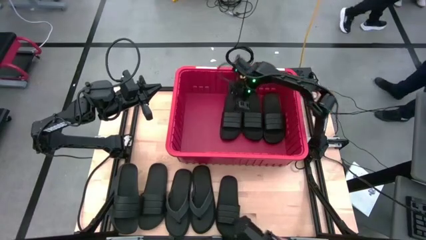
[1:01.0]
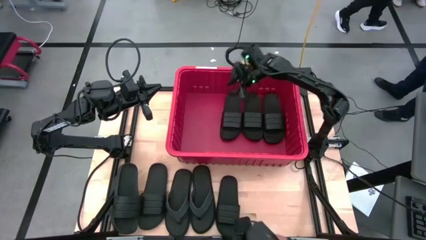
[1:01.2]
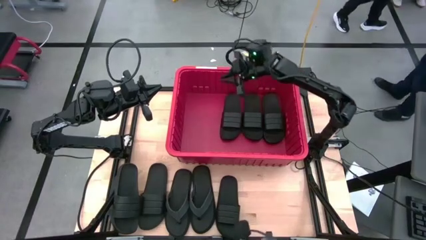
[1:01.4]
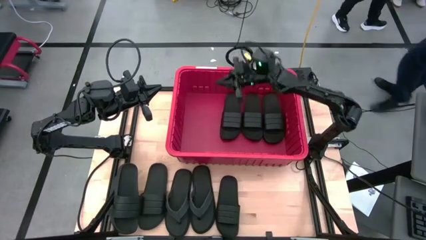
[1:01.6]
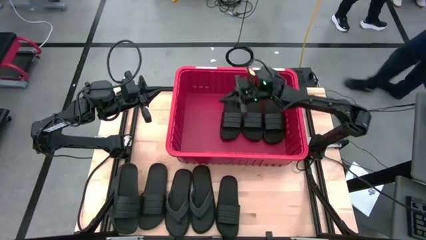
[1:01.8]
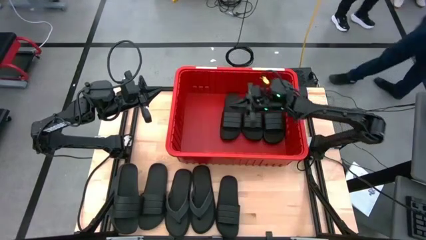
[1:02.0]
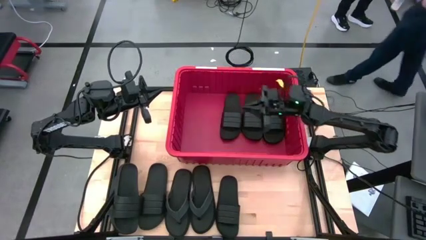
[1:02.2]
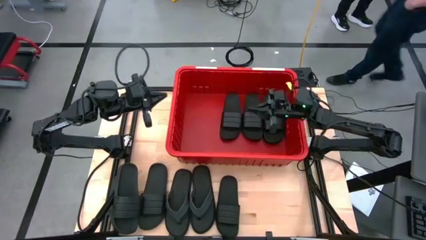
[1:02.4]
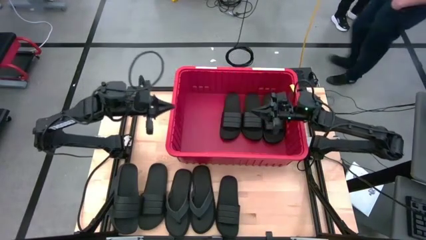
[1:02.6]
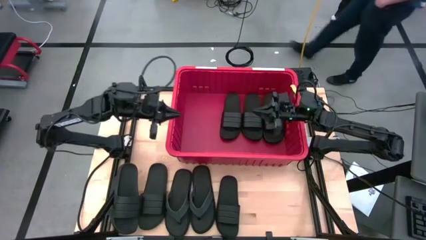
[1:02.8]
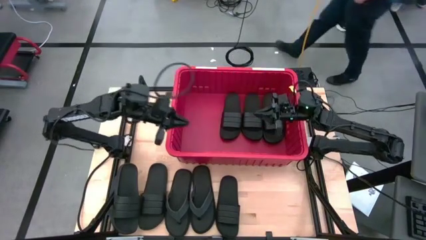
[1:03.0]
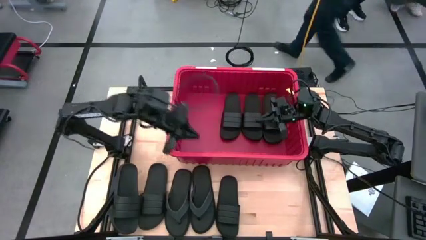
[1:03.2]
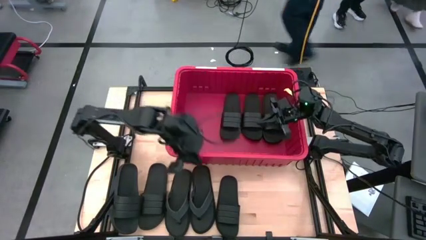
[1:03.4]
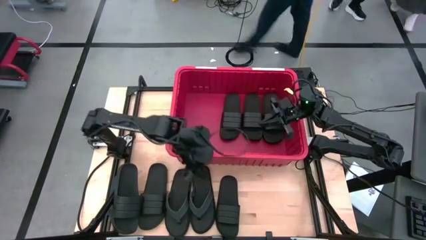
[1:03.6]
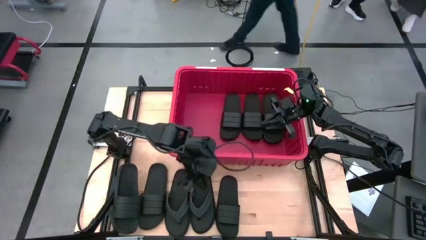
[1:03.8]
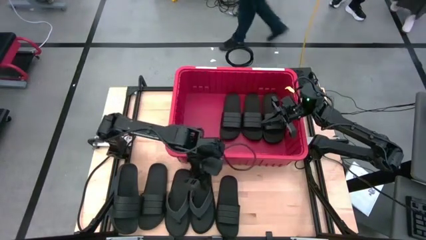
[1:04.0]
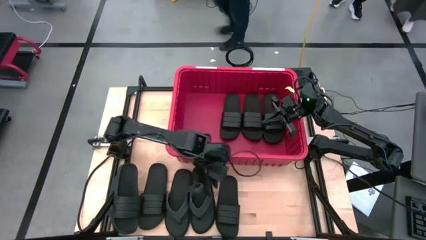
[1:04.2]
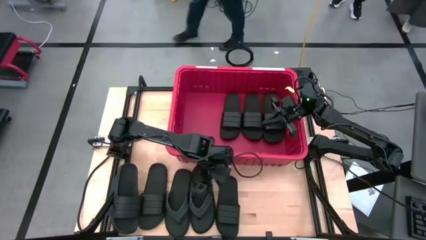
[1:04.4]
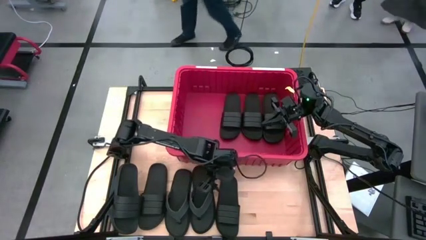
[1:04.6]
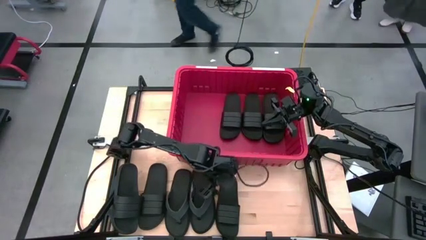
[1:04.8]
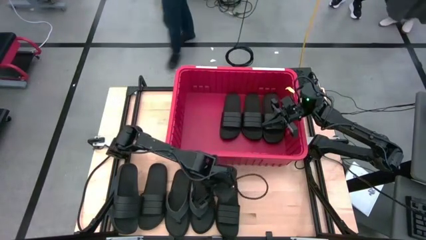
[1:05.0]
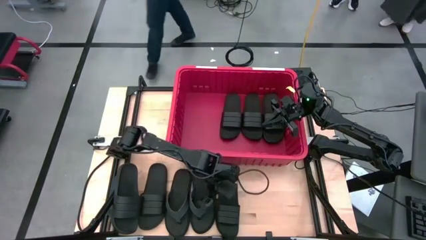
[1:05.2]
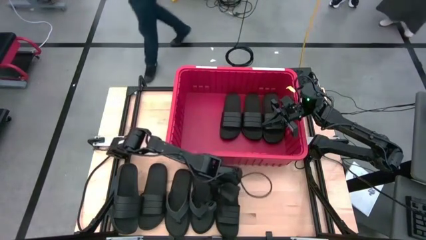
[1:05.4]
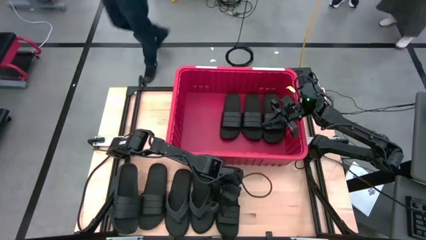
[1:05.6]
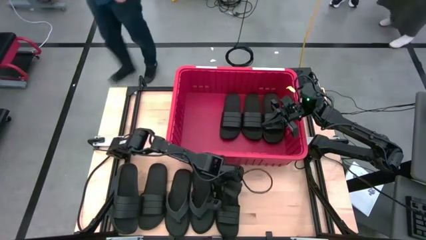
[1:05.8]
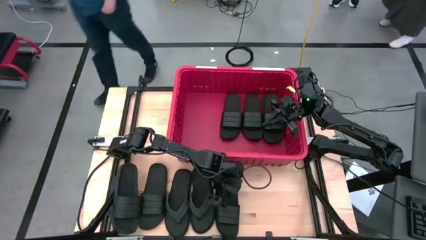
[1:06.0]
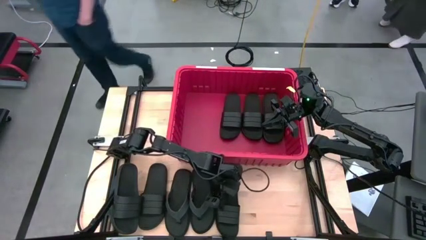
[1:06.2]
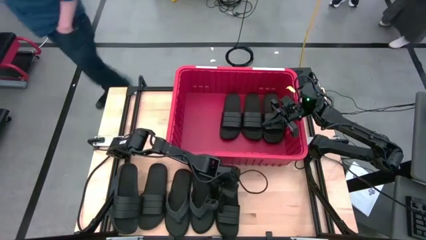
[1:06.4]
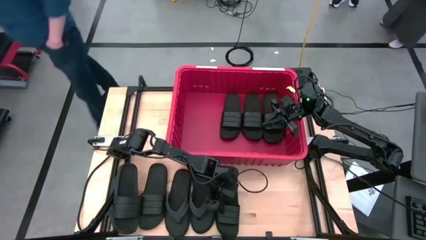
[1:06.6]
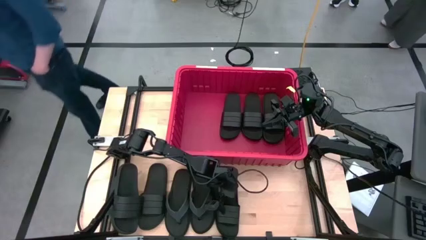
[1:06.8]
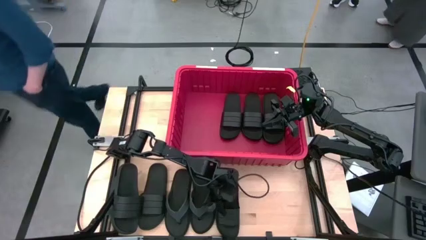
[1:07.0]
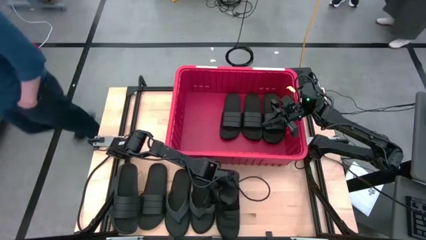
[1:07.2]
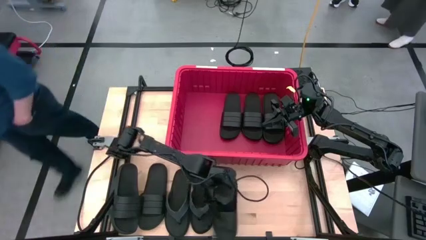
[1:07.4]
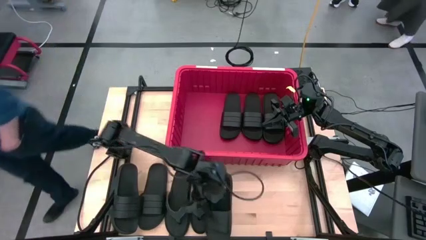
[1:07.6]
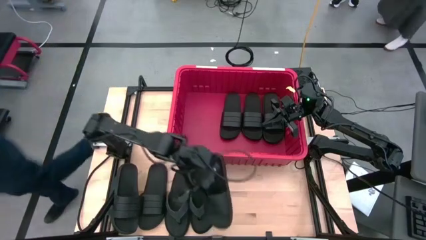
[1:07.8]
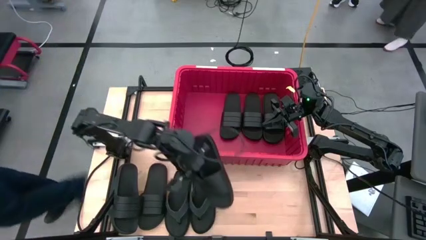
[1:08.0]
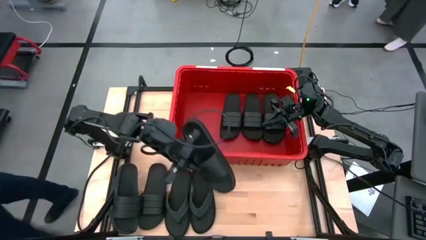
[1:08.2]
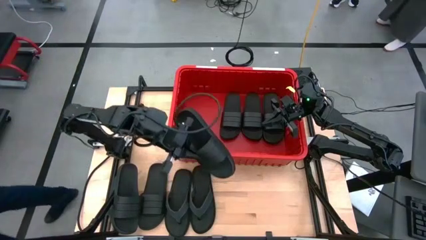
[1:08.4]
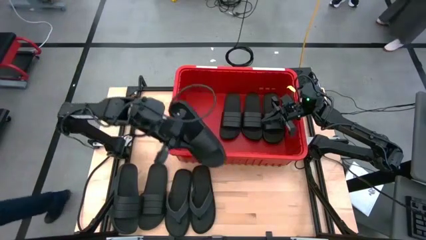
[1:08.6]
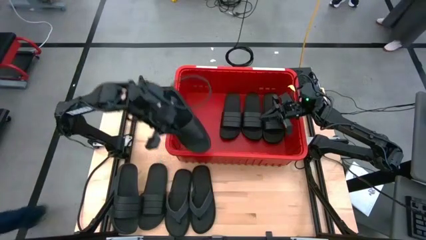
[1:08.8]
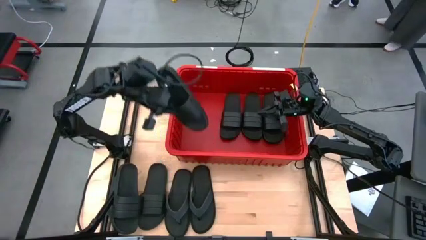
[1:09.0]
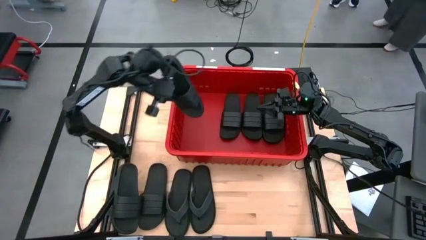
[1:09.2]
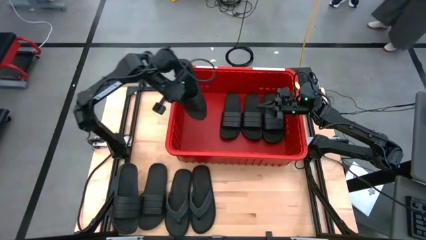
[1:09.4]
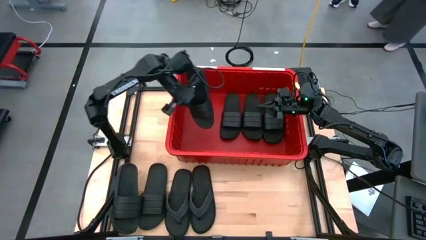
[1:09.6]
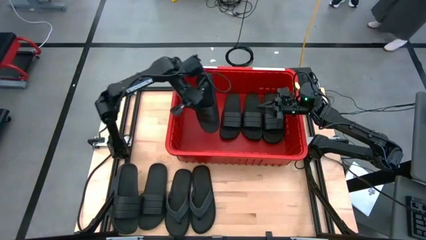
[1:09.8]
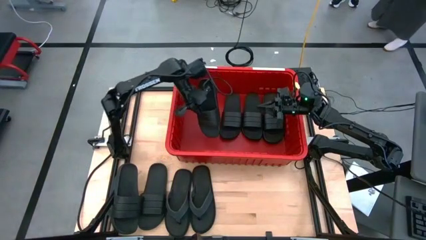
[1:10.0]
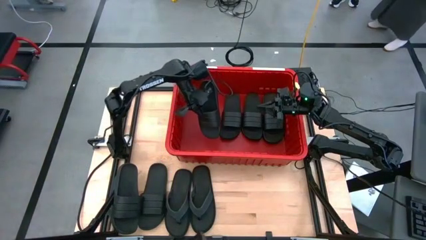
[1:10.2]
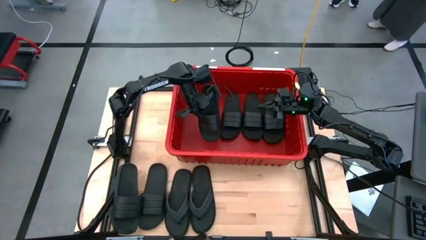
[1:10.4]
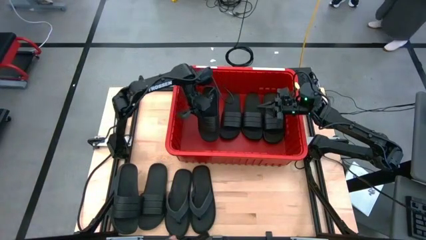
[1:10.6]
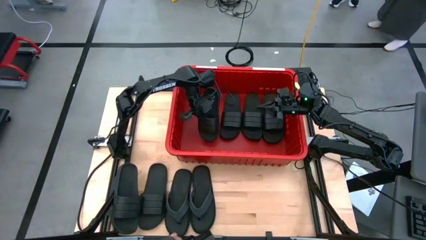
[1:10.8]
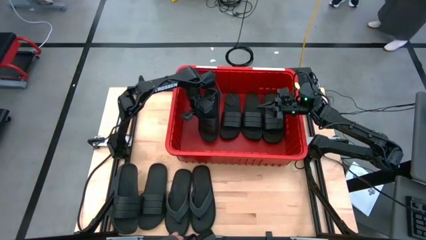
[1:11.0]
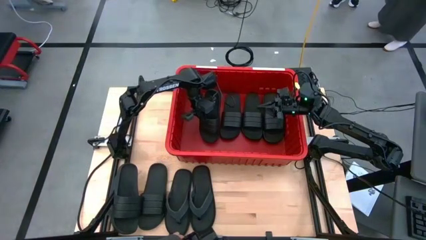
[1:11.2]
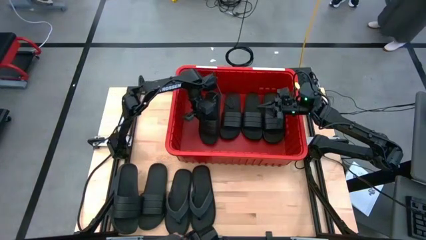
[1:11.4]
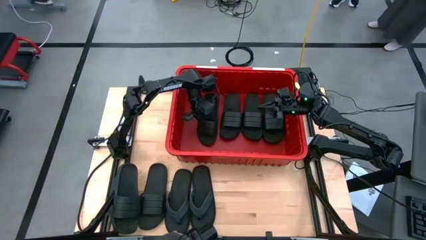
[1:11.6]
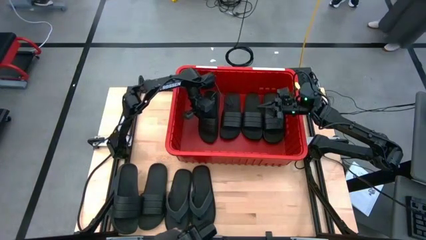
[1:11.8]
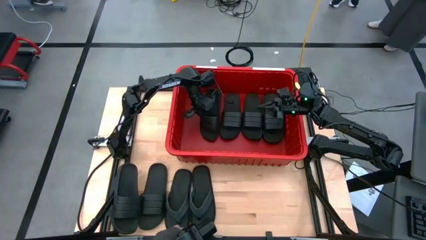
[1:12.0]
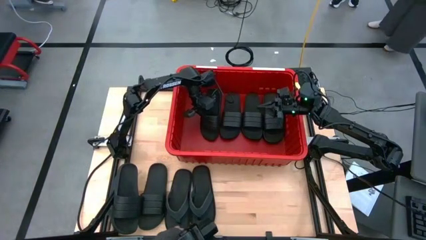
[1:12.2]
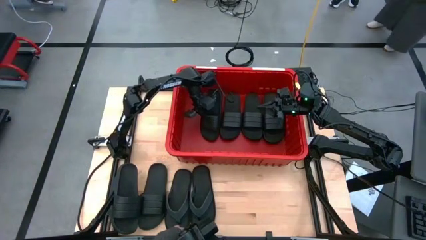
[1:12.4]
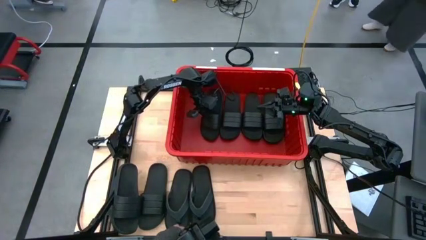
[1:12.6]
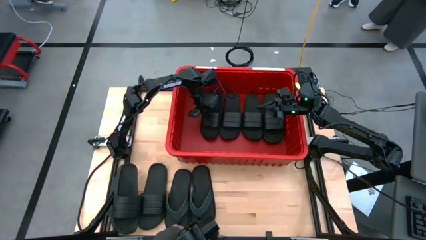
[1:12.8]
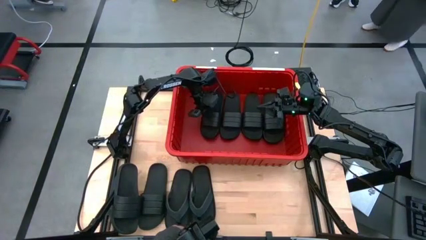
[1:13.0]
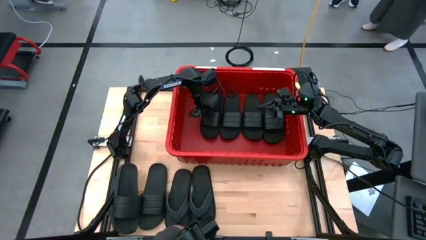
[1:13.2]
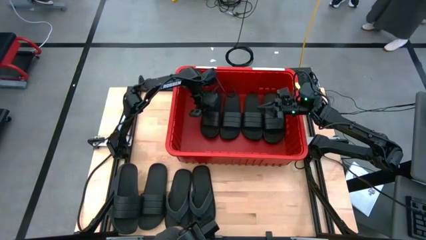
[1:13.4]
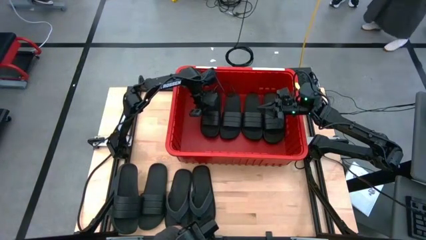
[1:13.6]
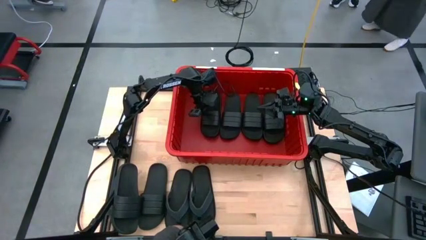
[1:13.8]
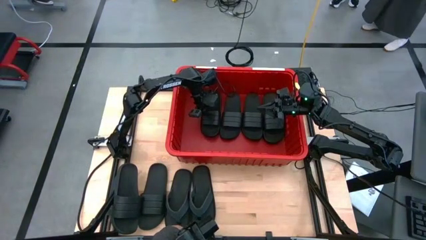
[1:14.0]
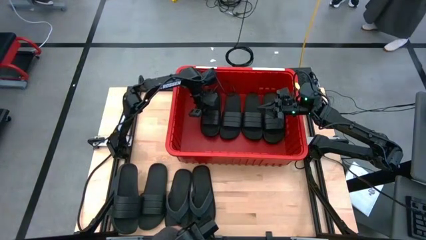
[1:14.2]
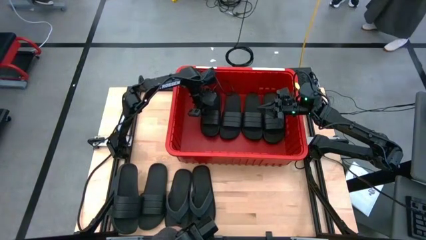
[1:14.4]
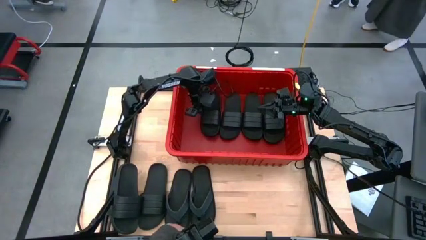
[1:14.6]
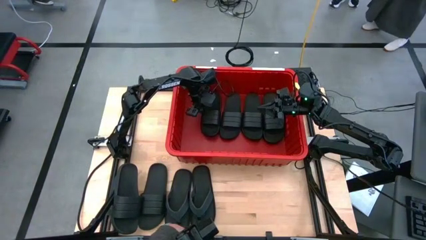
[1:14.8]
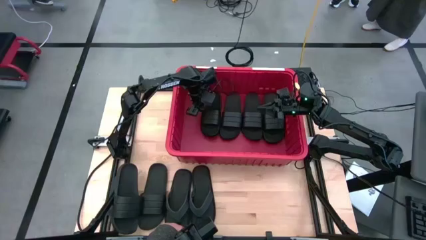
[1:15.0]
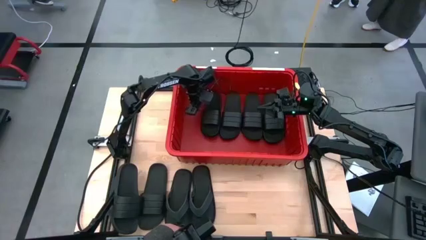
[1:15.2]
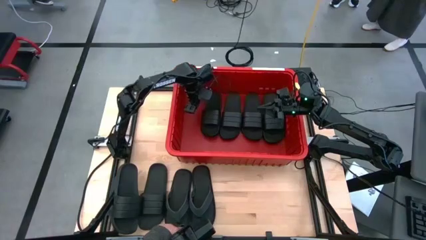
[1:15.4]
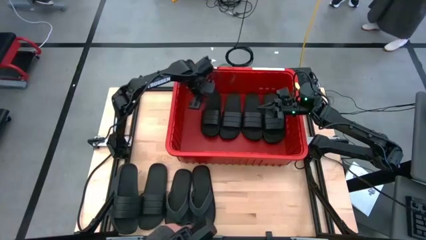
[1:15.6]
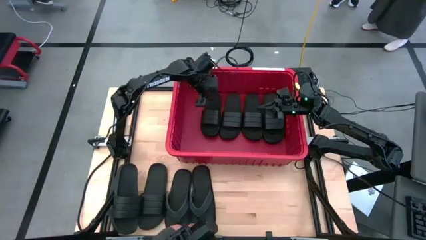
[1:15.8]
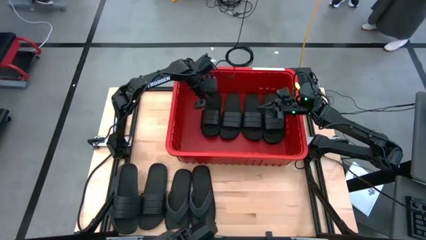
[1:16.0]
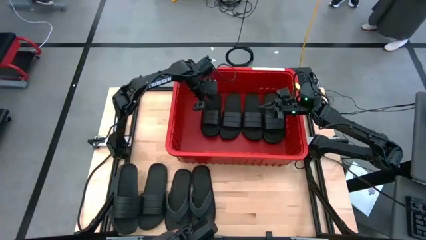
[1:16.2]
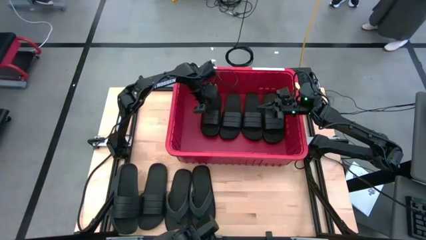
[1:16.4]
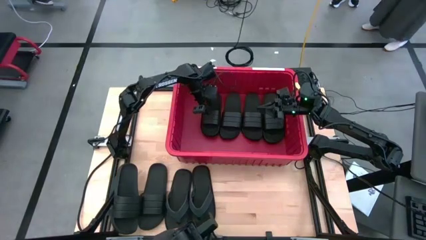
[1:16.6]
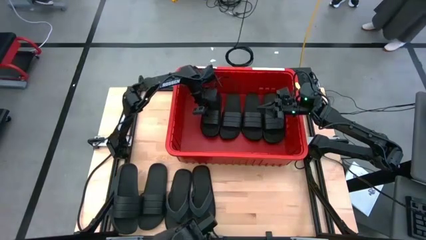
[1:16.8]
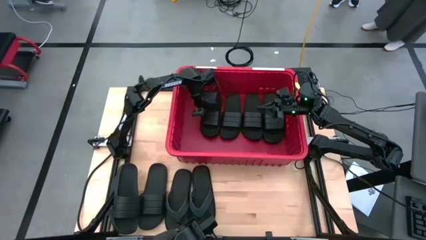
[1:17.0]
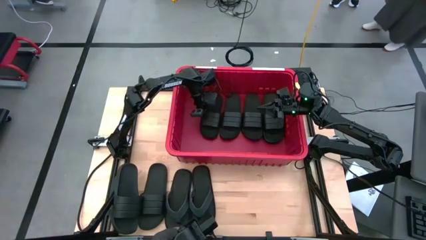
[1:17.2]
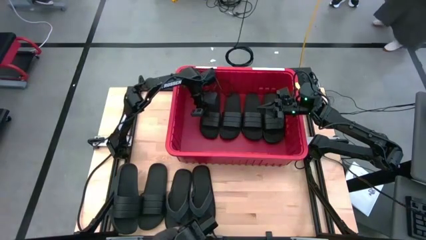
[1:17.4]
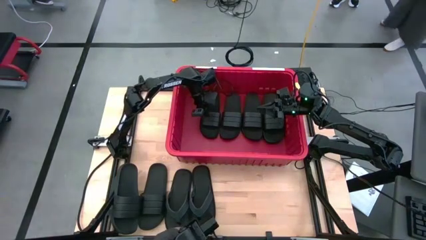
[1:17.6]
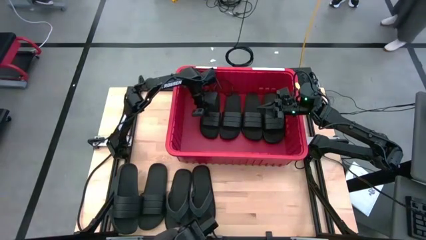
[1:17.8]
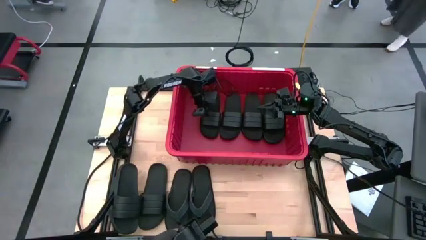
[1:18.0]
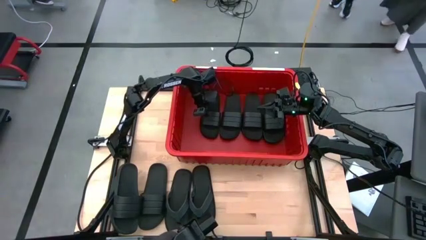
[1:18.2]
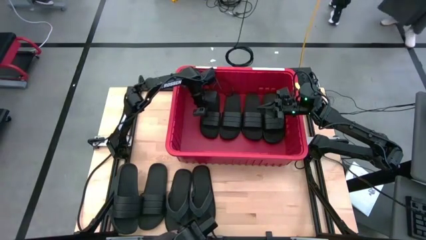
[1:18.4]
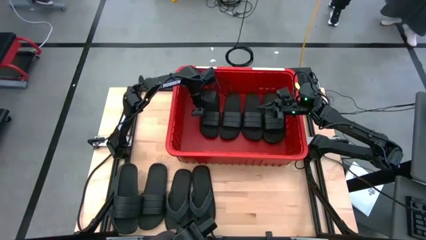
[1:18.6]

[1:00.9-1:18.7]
Task: Pick and place slides into bin
Put the right slide into the bin
